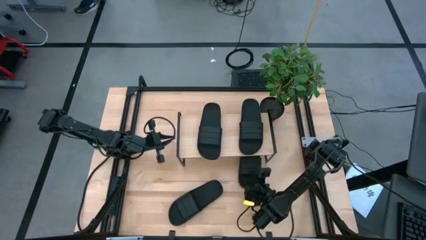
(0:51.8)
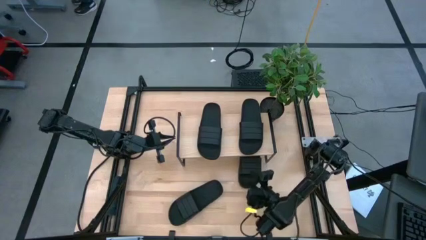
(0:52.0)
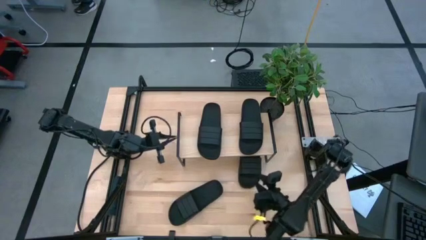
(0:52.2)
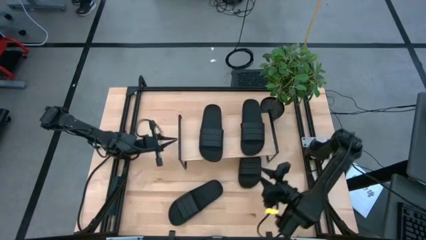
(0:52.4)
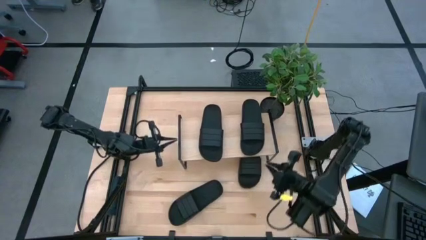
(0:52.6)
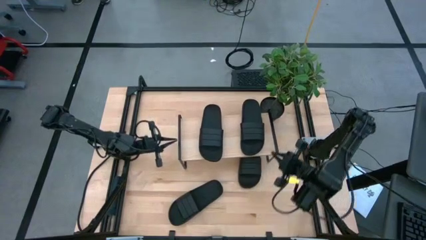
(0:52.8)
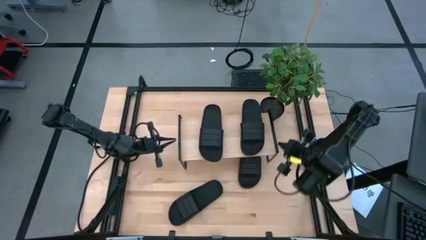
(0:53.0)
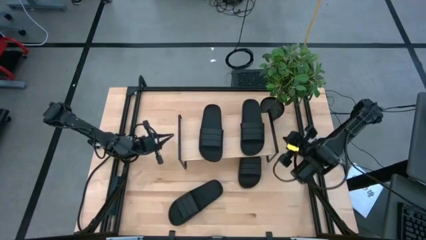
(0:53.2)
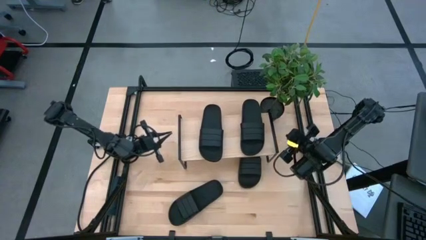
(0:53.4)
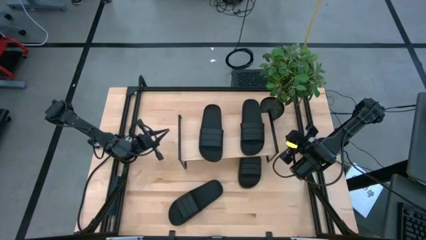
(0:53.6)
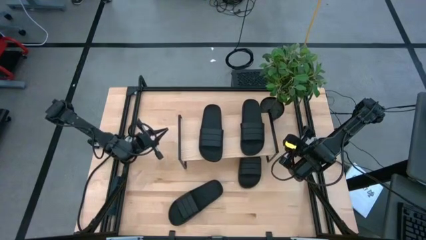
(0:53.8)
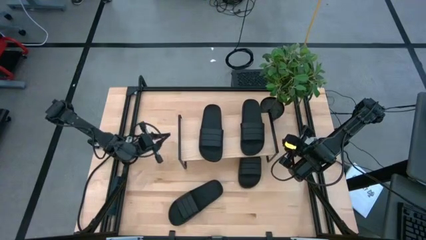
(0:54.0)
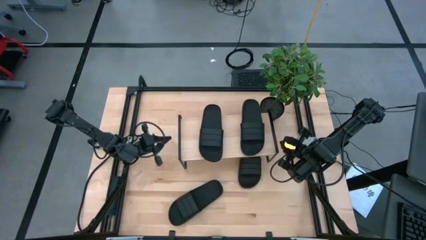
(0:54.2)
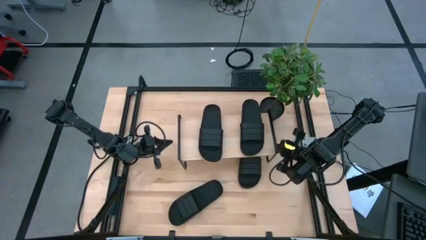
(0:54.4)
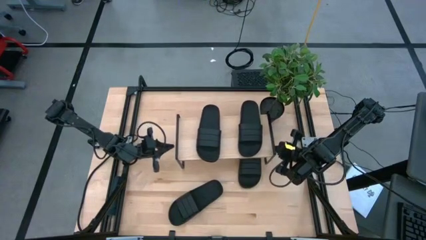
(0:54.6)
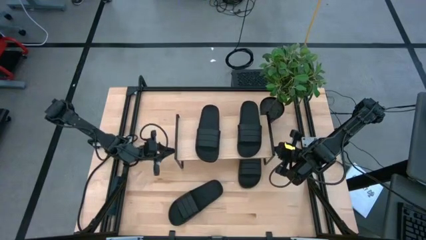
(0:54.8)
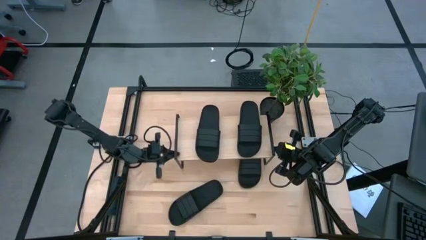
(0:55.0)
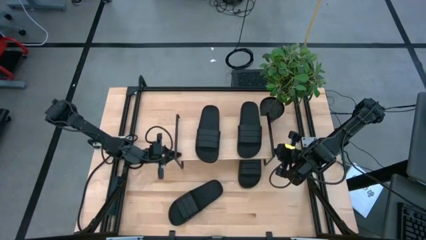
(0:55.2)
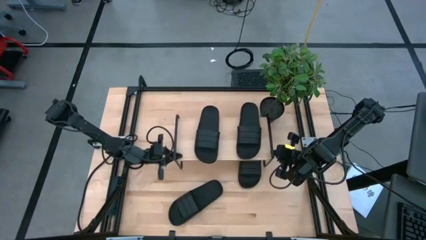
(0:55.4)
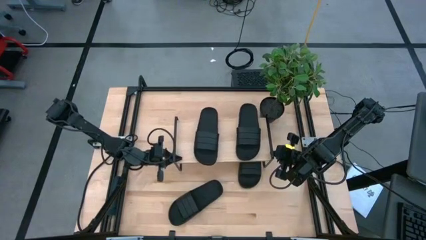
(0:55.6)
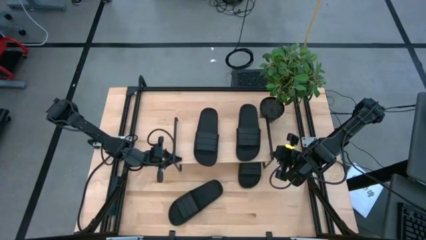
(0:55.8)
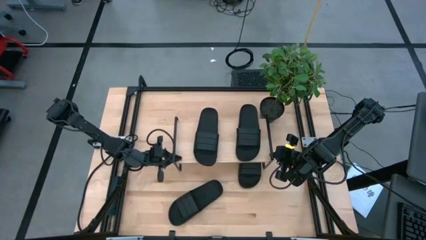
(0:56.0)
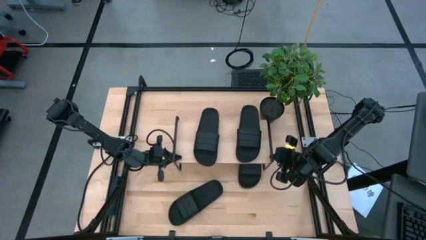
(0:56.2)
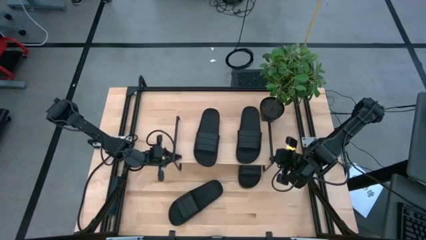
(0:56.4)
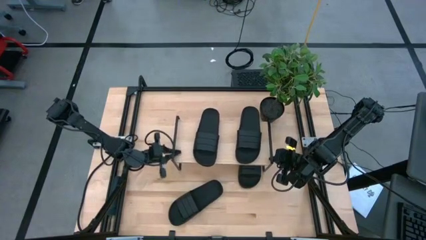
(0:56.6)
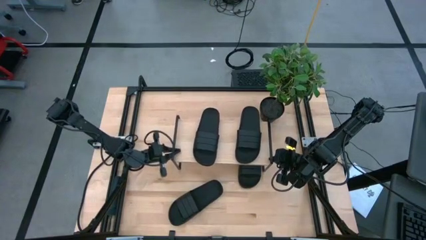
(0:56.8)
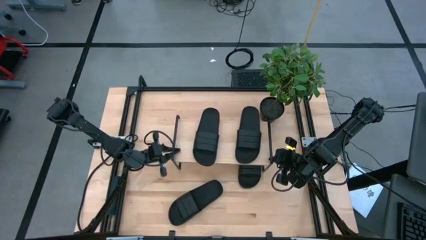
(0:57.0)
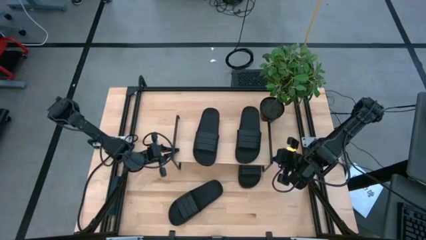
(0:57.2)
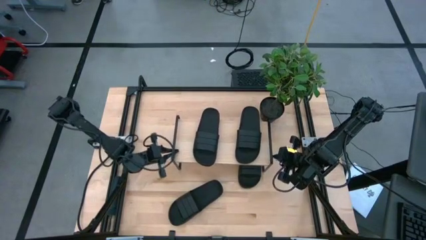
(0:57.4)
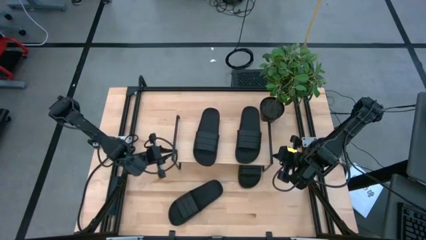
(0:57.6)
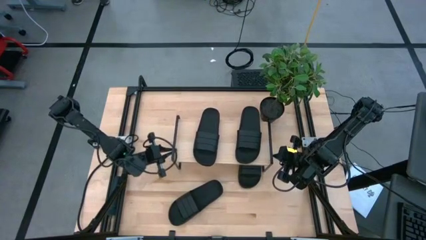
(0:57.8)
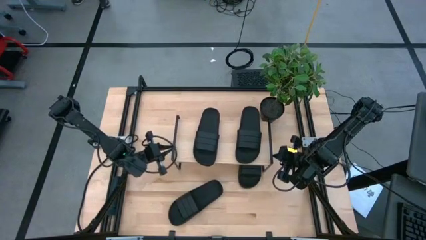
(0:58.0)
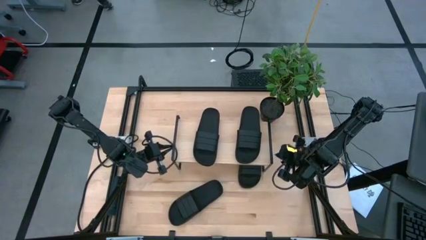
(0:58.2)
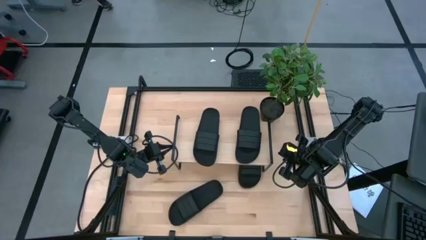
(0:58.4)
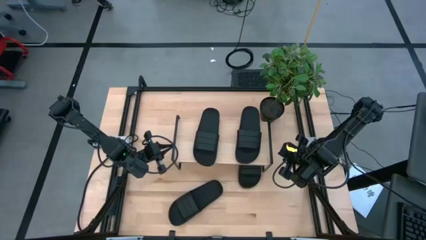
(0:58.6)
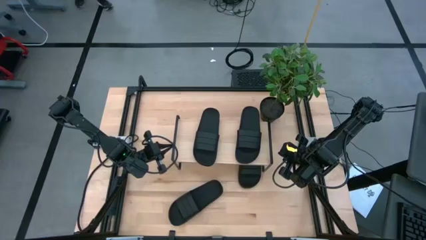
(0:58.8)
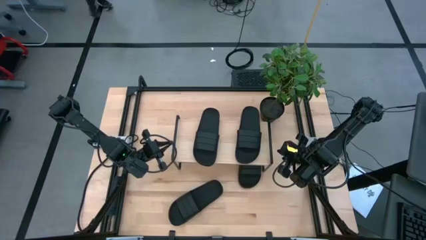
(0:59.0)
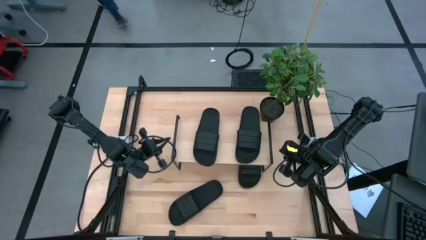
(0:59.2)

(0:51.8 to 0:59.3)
Task: Pick and place slides into the shelf
Adjust the shelf

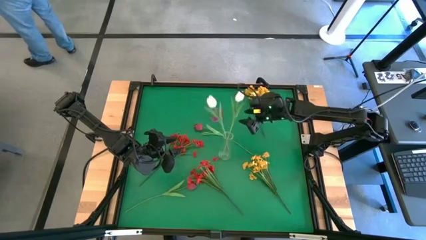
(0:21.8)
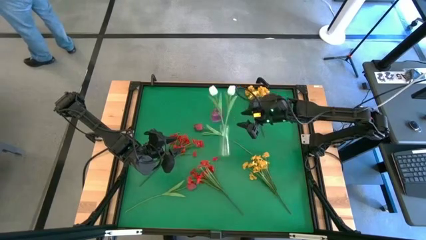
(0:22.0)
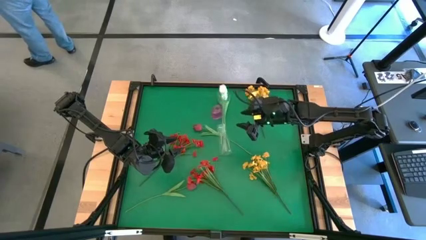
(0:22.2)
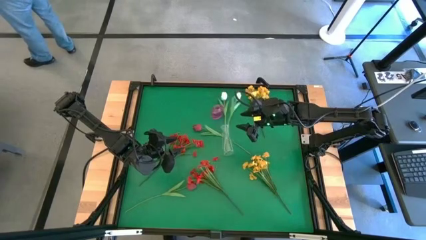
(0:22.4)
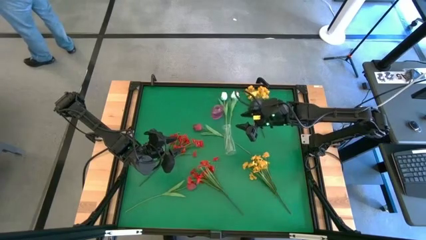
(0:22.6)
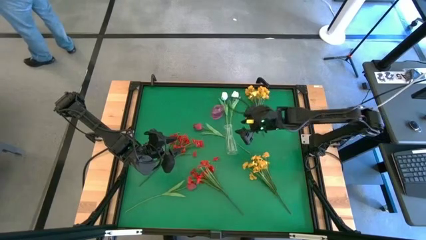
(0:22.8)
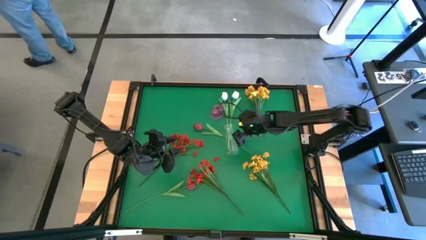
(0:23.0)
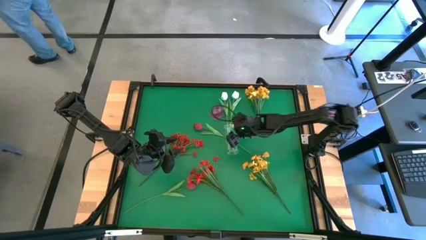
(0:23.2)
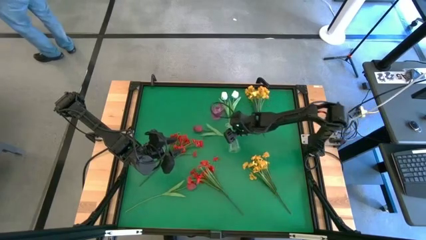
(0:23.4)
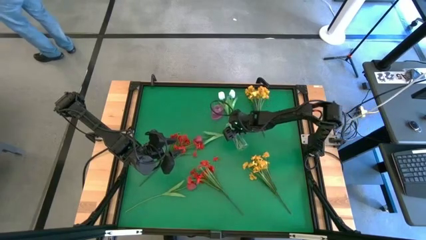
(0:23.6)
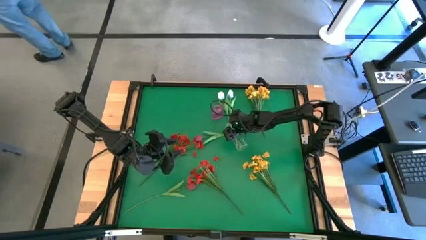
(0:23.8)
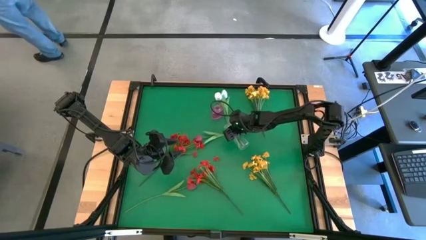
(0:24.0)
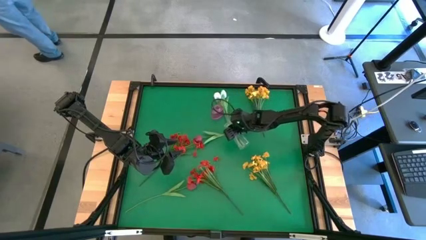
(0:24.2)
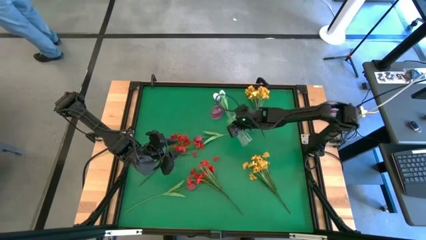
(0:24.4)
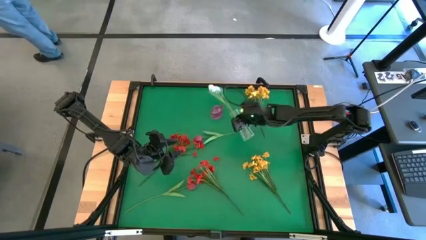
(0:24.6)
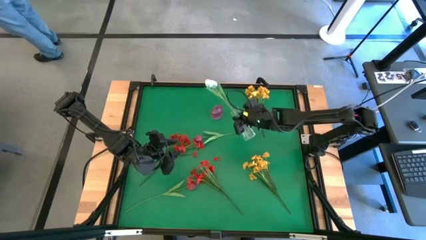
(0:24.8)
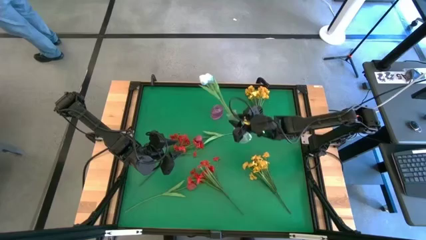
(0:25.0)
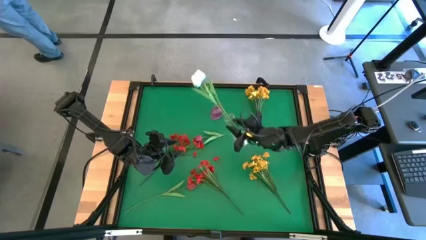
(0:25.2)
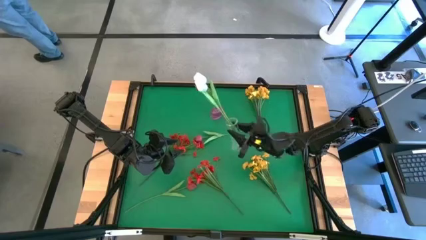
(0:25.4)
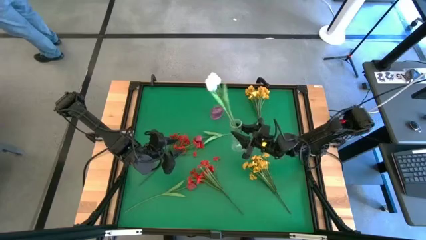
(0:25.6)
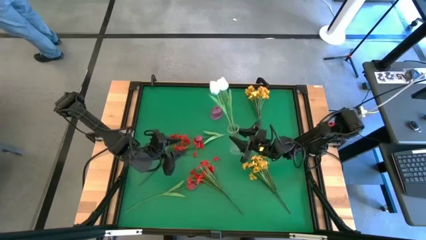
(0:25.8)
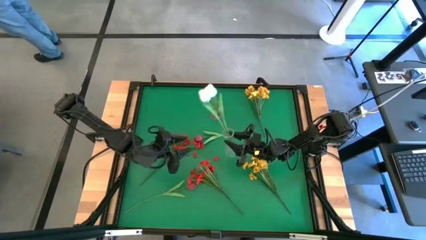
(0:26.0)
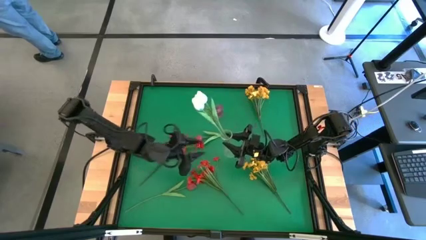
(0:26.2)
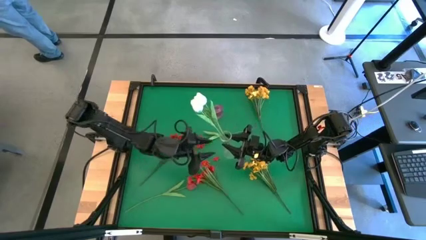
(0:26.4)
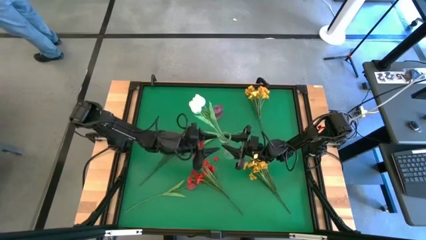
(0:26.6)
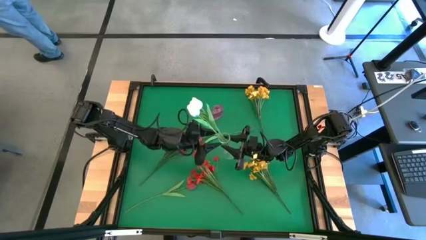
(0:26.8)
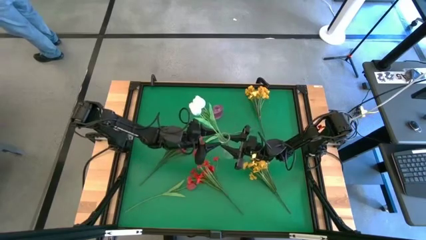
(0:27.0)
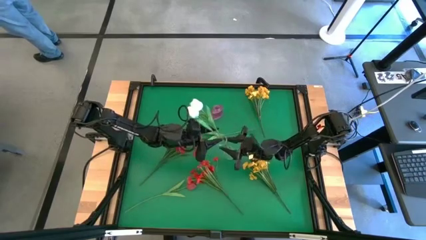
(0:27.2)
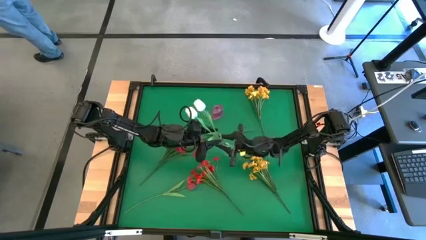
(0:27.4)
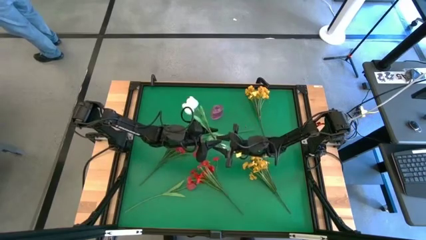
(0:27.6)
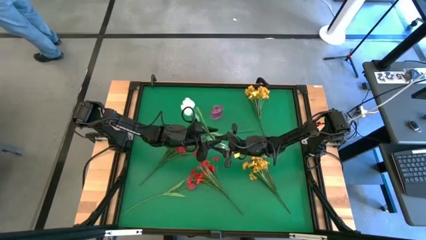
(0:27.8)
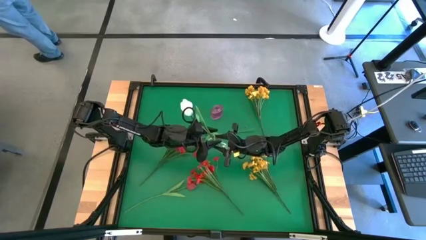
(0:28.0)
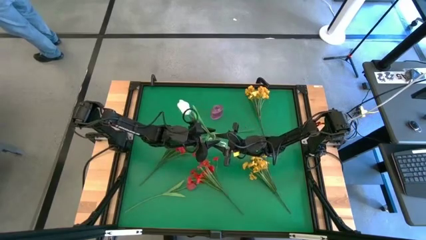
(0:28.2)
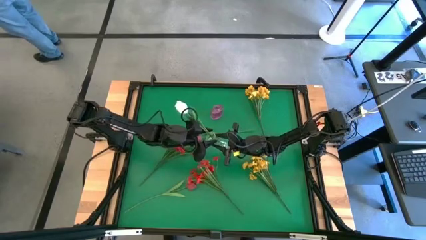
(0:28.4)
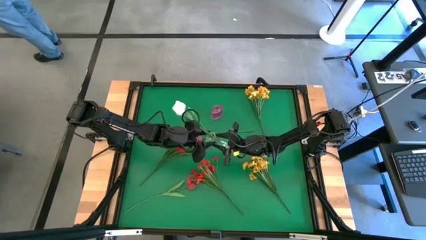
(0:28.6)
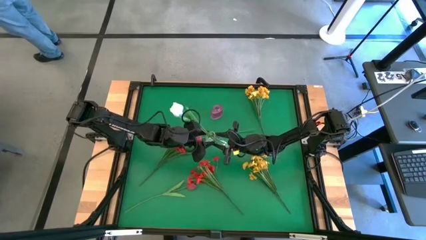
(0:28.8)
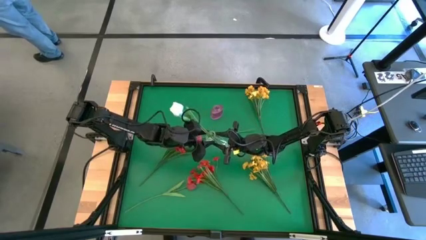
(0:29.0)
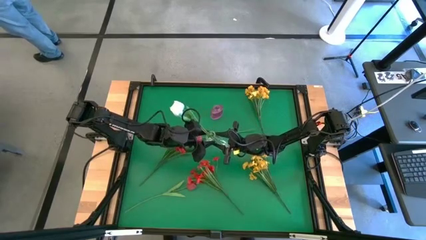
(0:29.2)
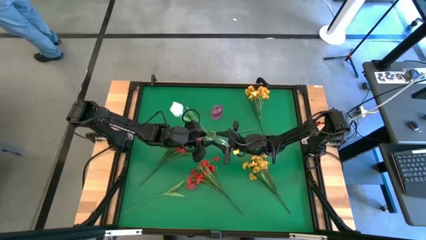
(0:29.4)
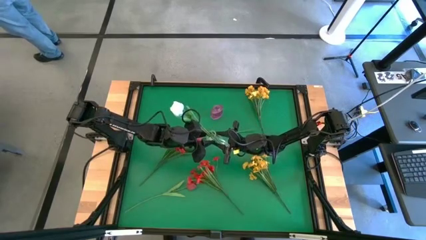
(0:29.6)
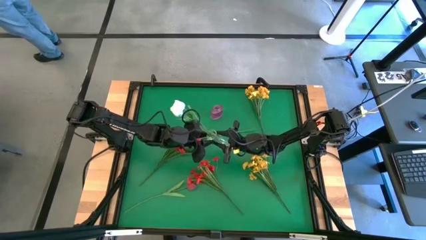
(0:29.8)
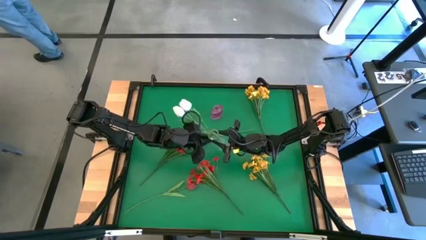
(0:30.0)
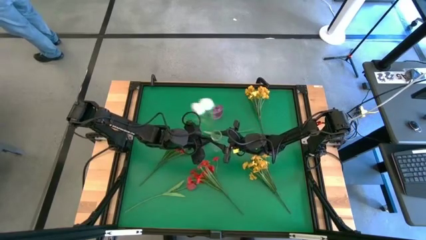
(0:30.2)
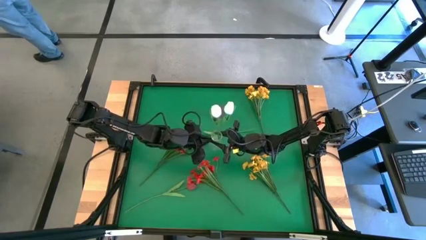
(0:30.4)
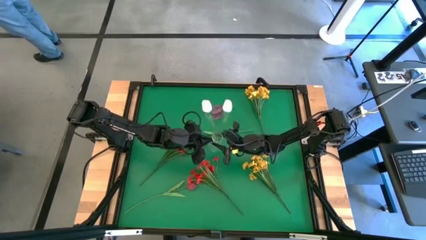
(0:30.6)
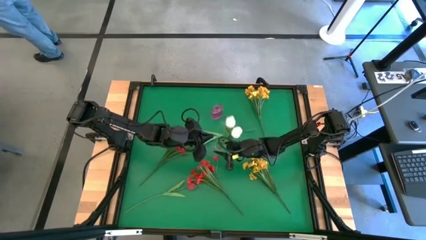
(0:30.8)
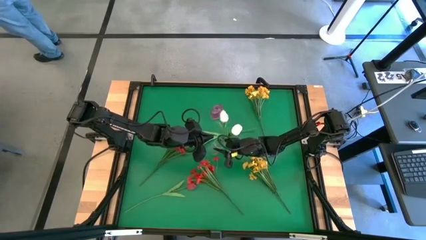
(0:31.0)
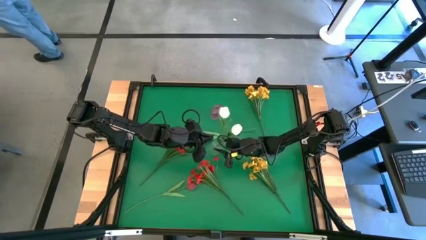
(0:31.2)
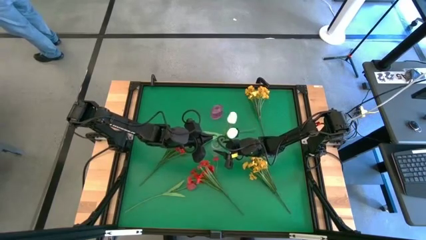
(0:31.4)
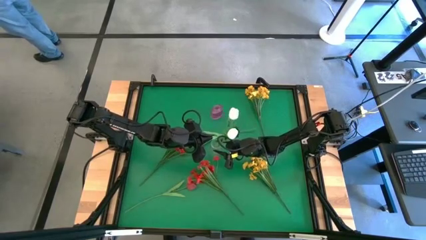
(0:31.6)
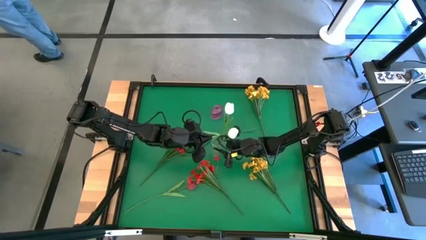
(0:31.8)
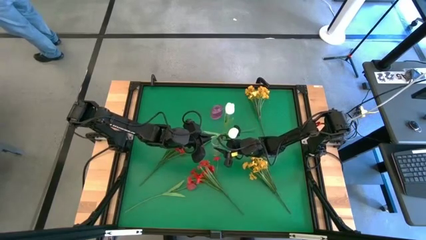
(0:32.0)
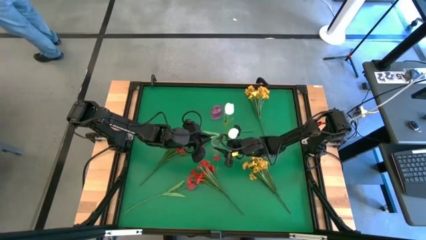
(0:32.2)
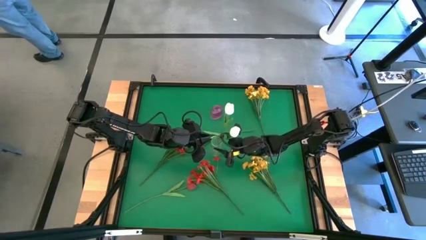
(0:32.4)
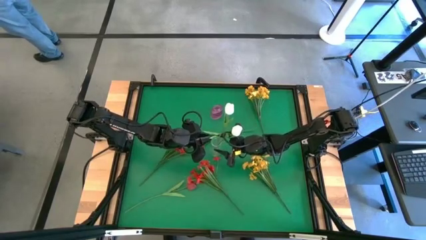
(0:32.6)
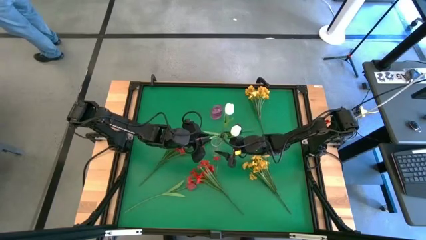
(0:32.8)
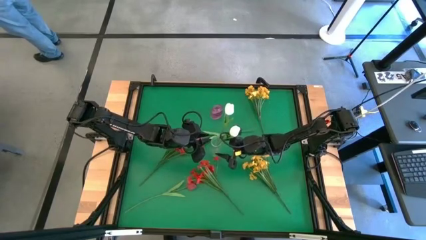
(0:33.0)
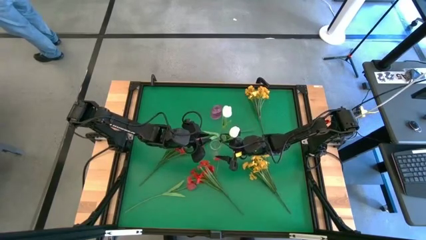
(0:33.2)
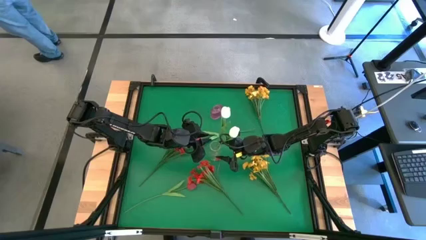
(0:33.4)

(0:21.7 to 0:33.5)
Task: Sort flowers into vase by color
Adjust the transparent vase
